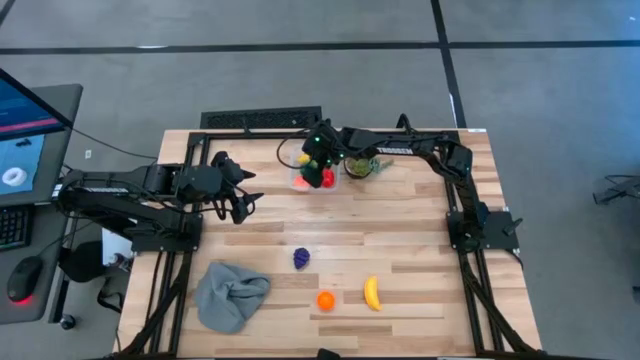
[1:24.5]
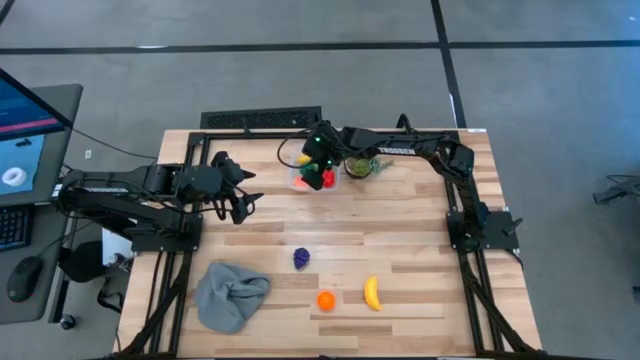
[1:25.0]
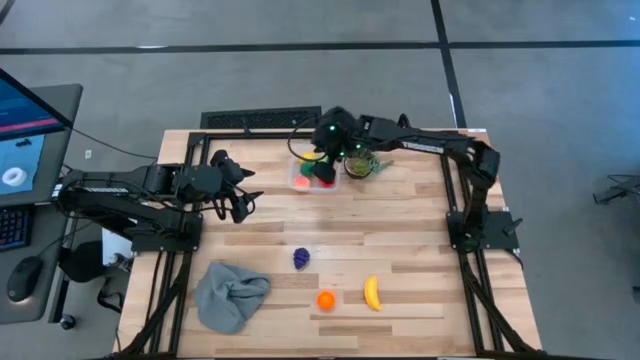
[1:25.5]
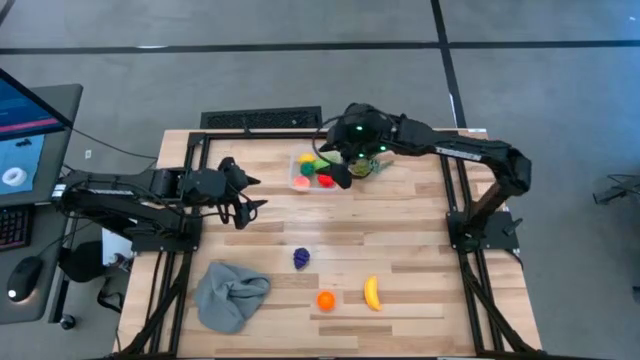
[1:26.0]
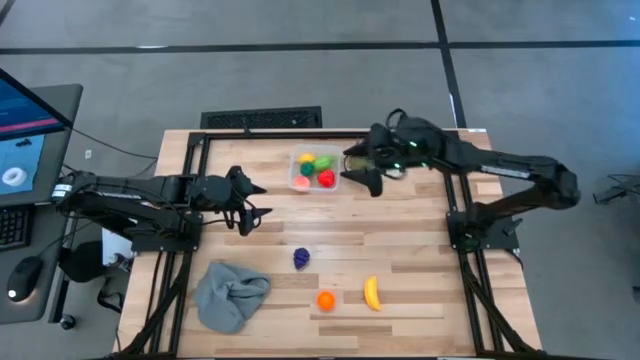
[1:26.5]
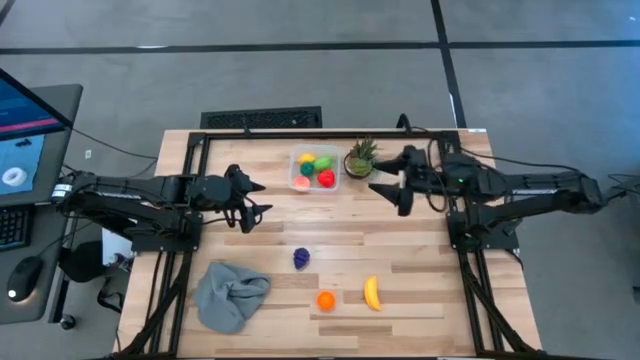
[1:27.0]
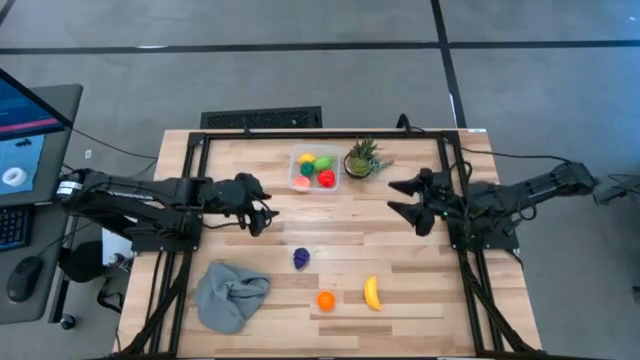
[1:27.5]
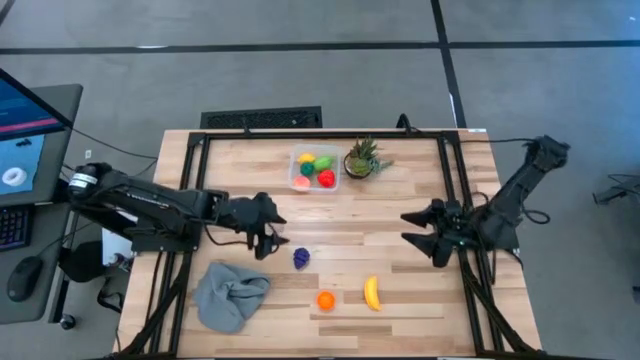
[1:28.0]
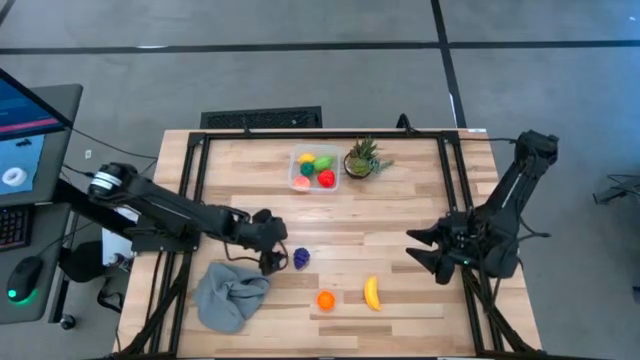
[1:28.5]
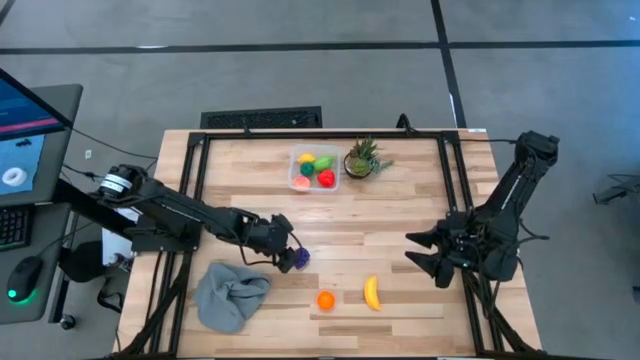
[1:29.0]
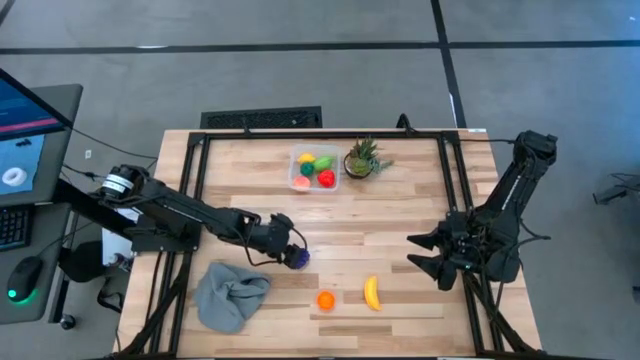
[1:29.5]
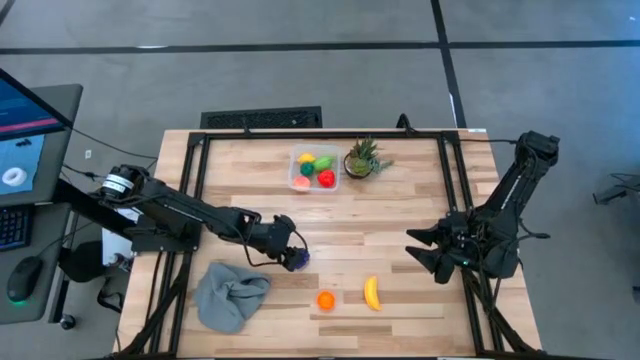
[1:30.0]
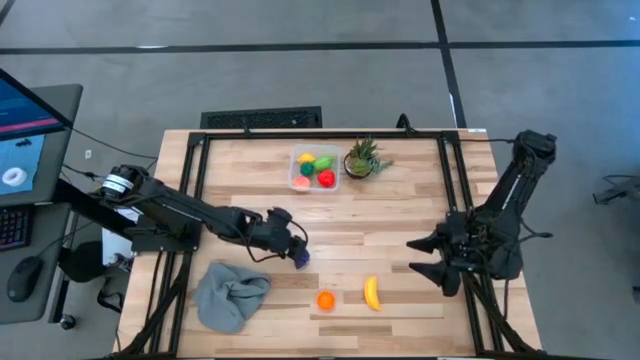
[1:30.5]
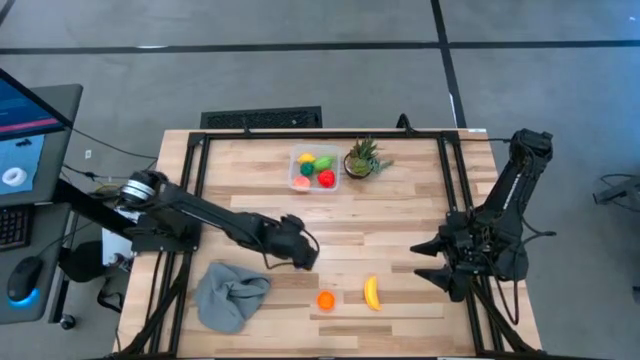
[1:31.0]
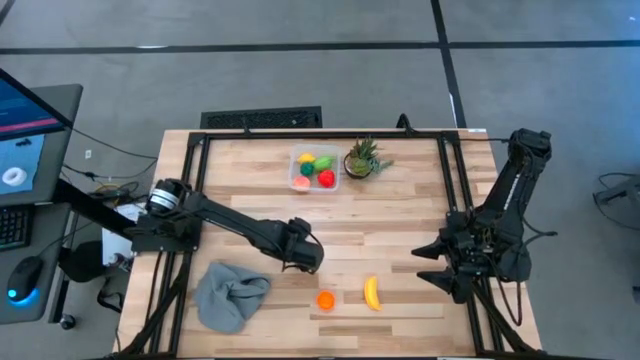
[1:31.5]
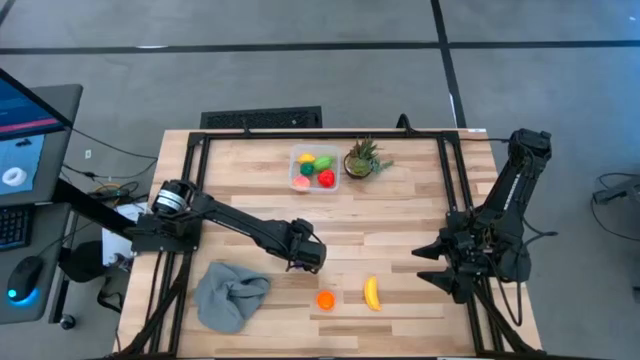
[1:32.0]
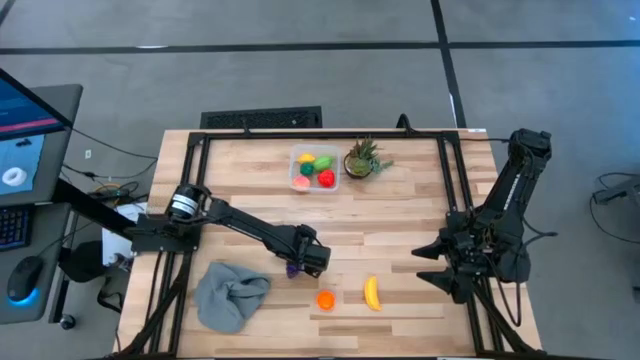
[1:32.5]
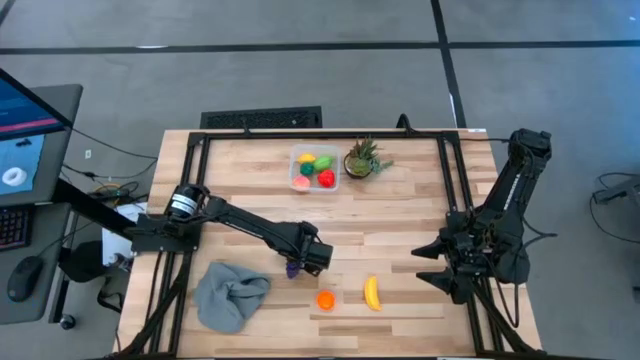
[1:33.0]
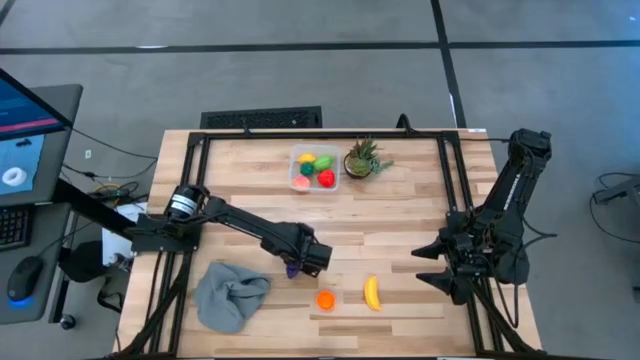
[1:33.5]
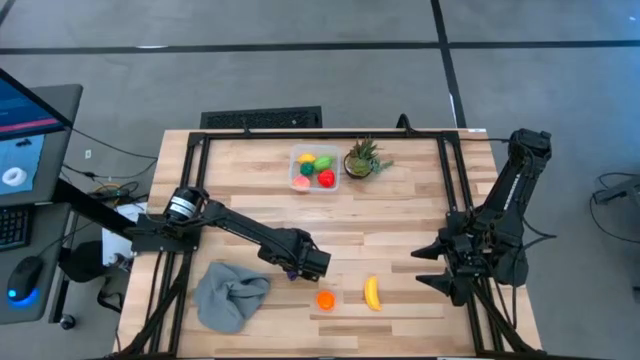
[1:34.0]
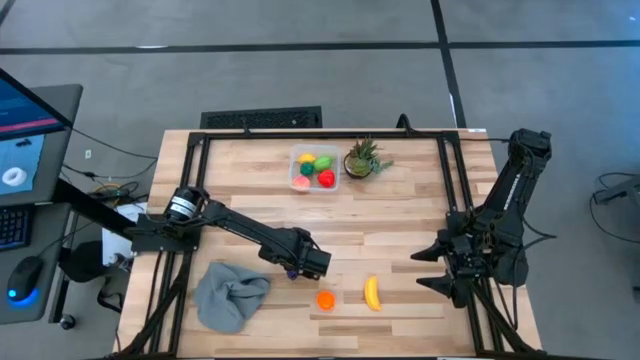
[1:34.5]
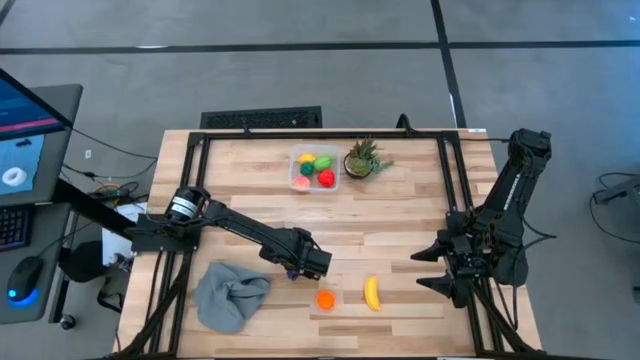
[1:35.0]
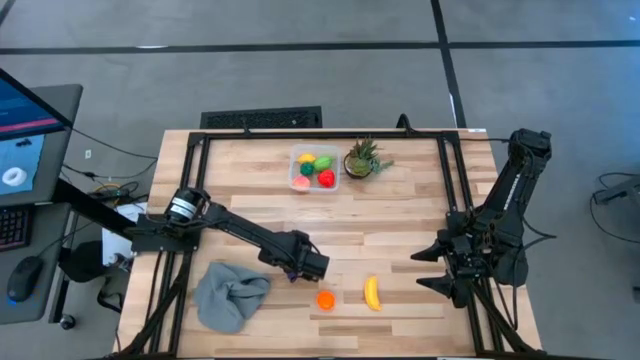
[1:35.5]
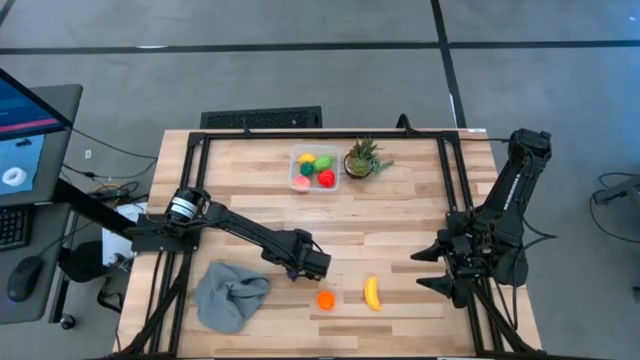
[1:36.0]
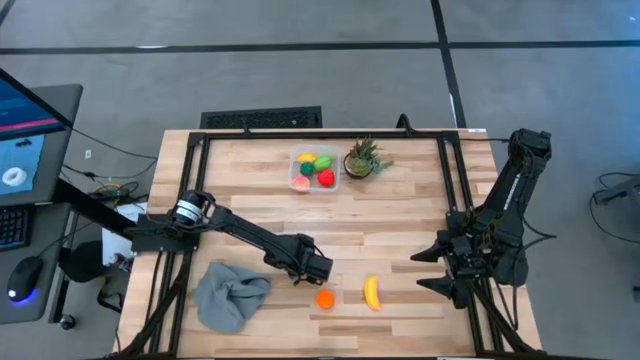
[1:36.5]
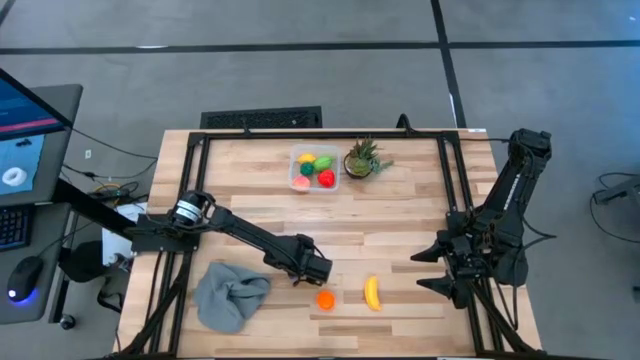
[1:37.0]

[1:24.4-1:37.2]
Task: Pick and placing Produce into tupperware
Put the violet grapes into the transparent container

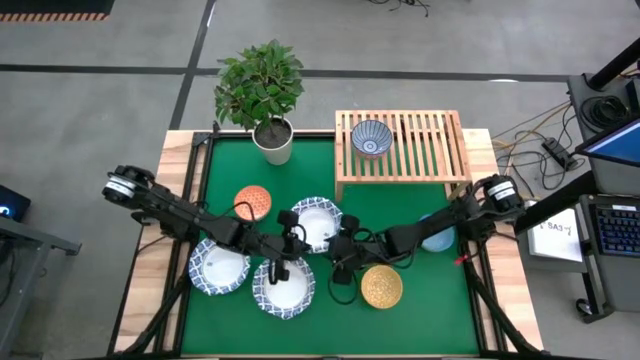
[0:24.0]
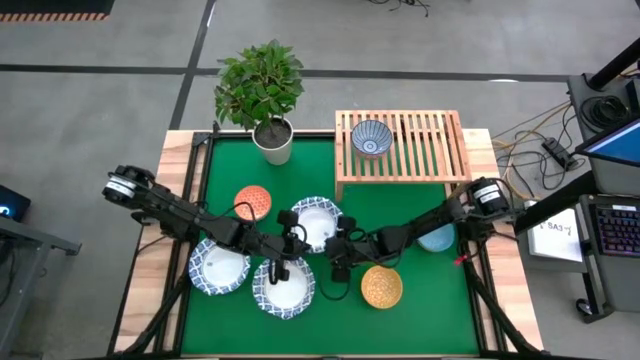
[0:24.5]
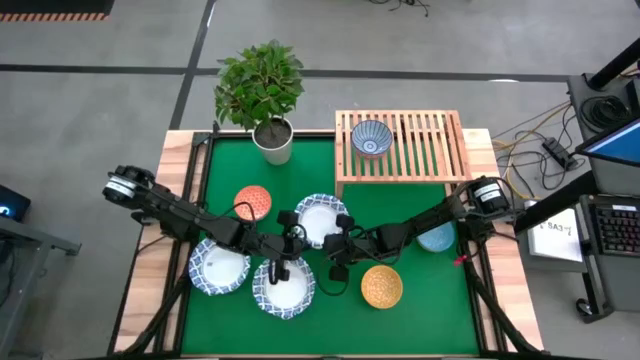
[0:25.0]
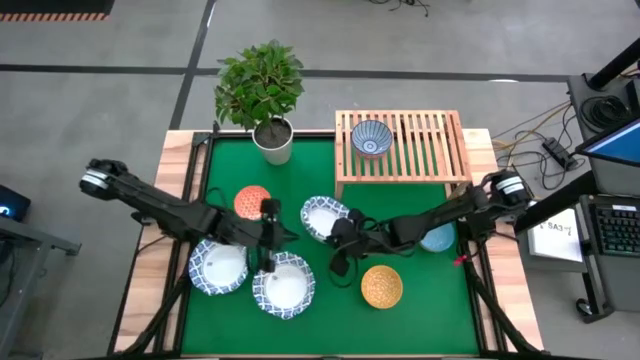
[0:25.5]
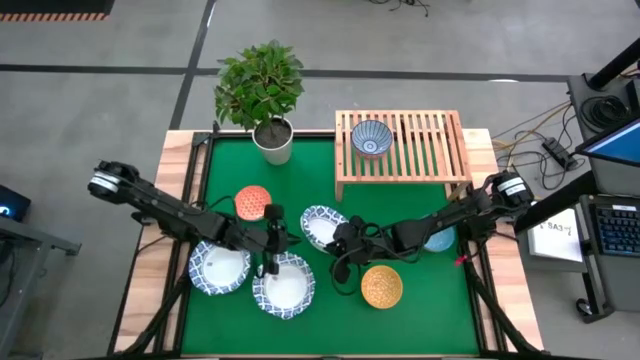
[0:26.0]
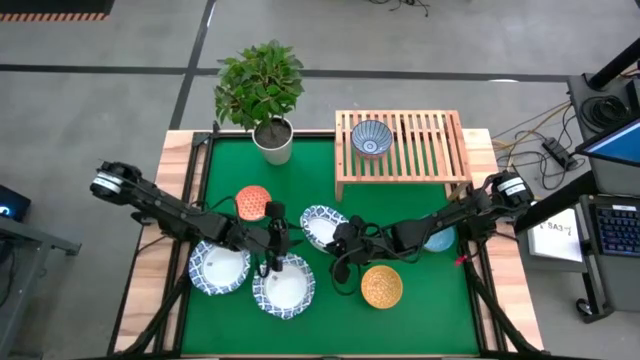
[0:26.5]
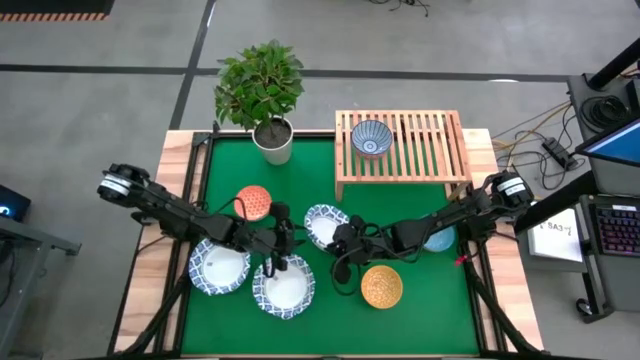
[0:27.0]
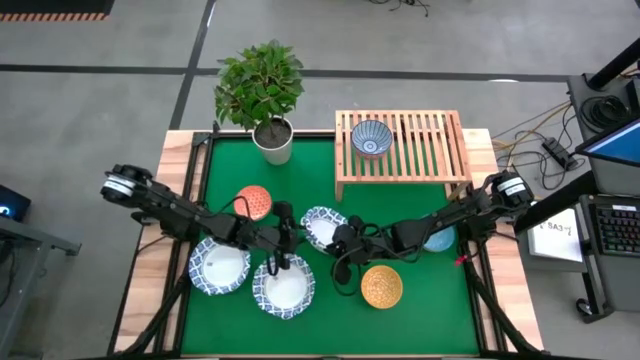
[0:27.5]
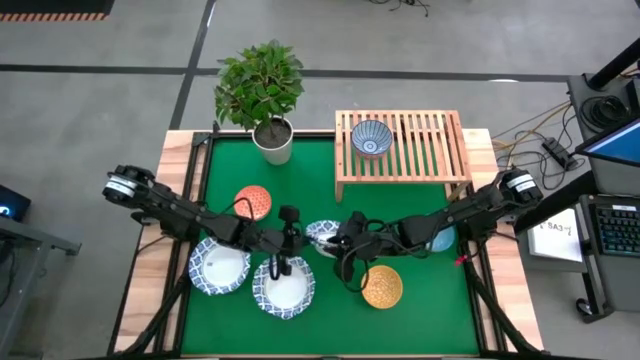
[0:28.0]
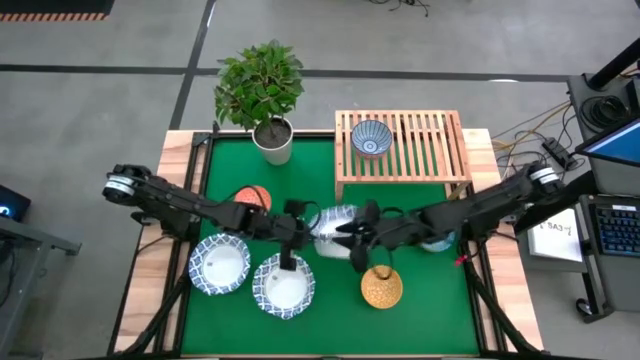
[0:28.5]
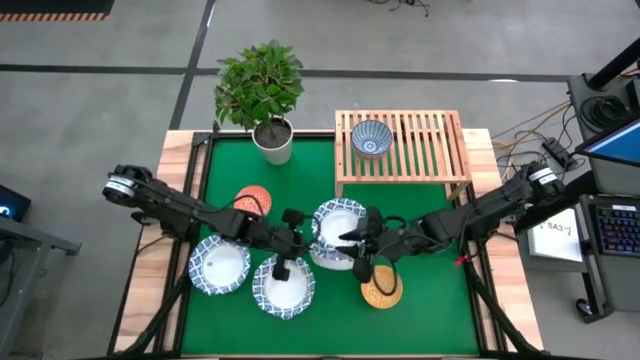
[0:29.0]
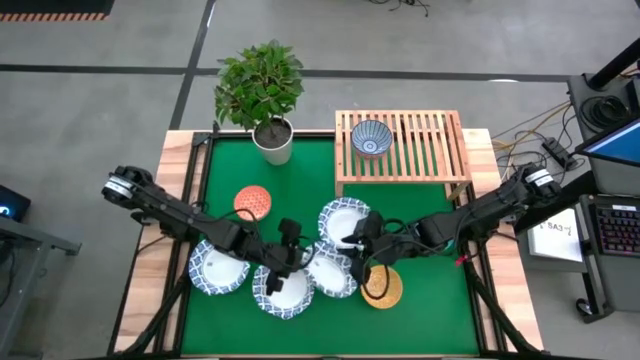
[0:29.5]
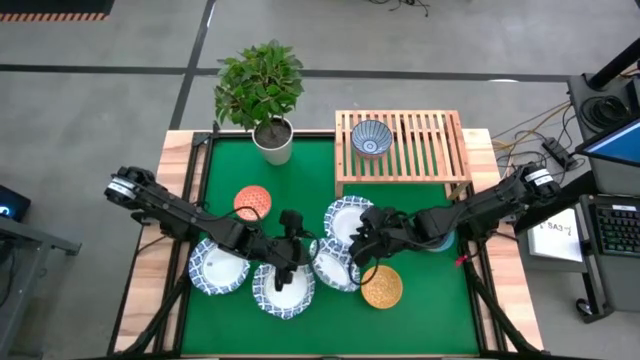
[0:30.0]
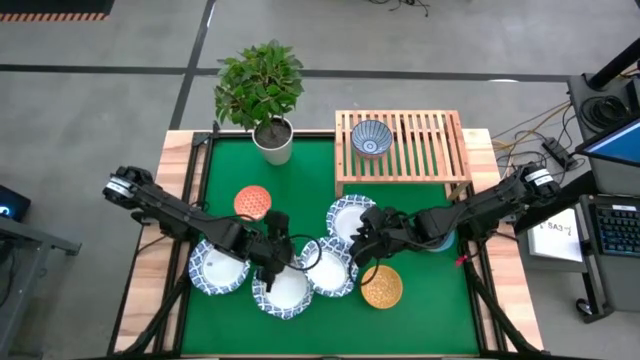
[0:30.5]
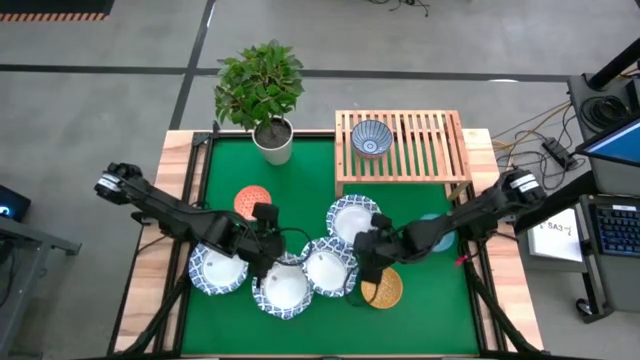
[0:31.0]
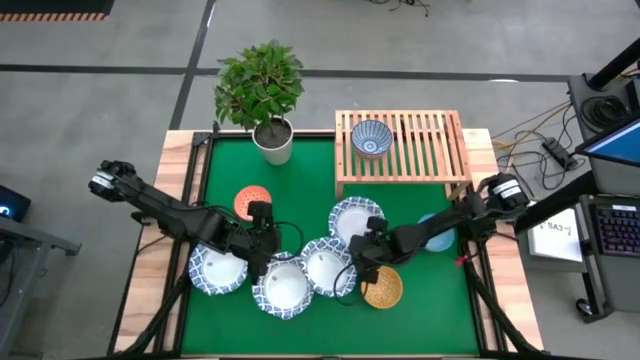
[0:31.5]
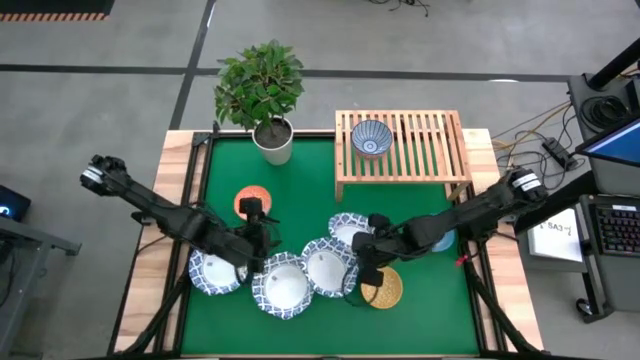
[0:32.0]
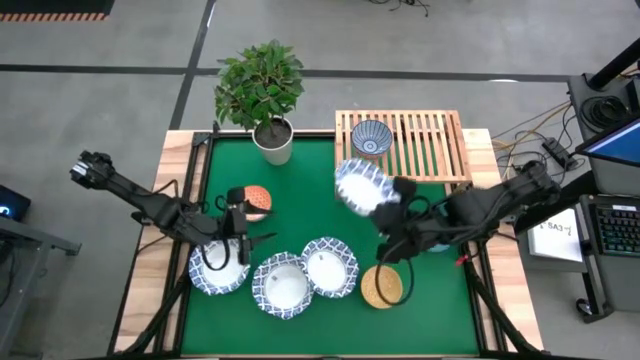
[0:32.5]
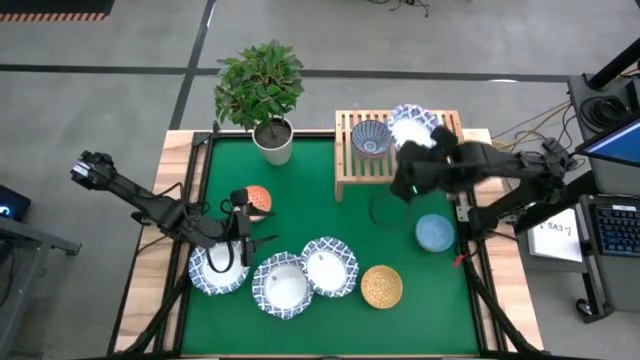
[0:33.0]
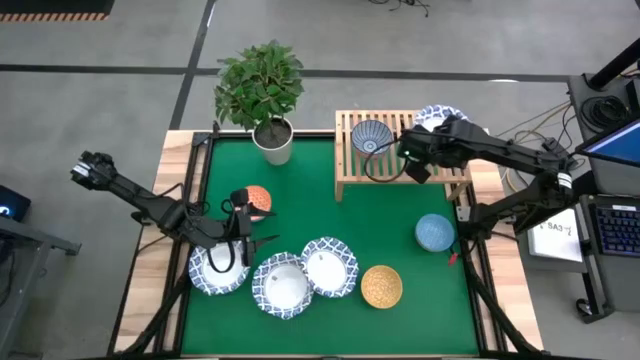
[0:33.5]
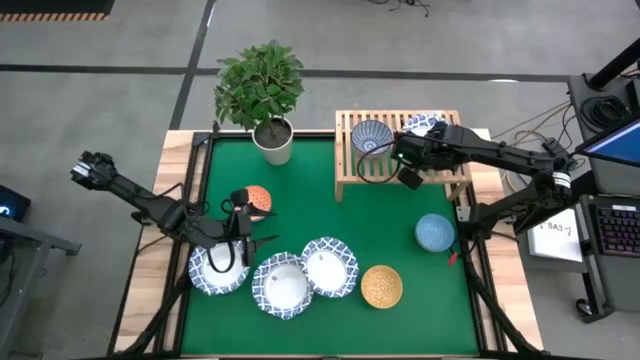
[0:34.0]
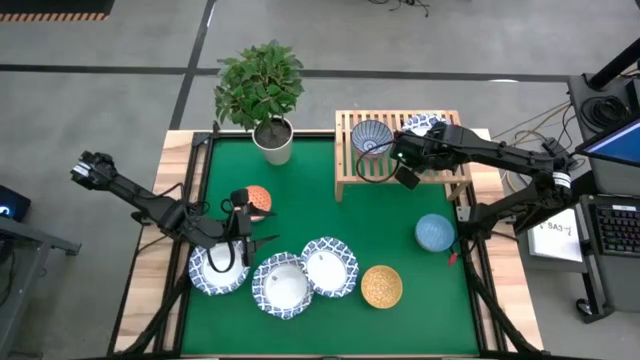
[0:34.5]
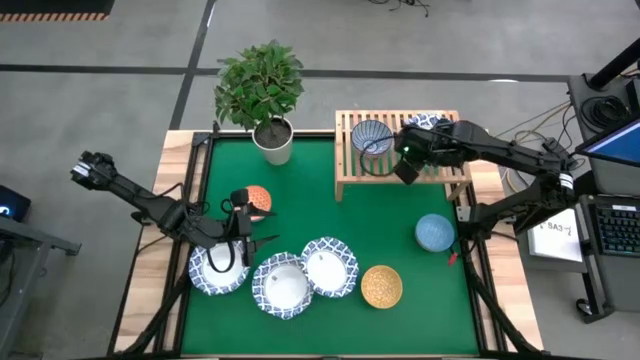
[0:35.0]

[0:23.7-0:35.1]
Task: Place and stack bowls onto a shelf
Put the white patterned bowl on the shelf
